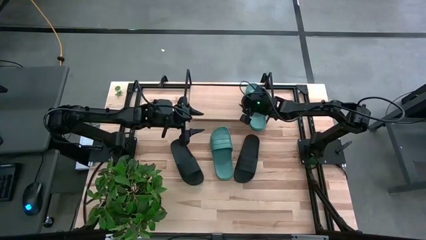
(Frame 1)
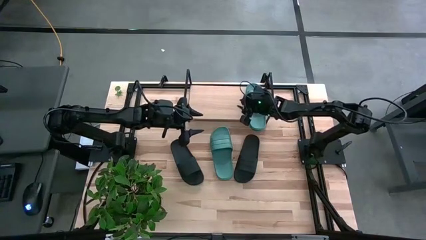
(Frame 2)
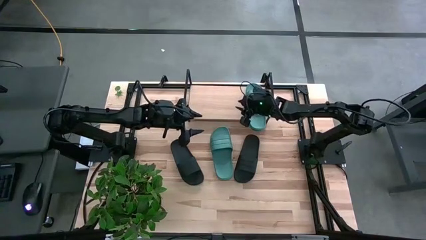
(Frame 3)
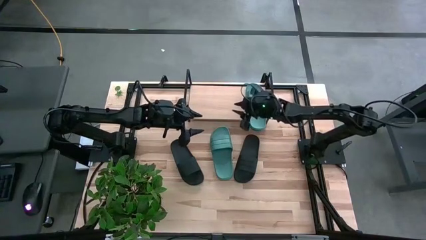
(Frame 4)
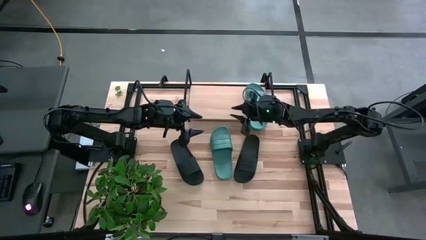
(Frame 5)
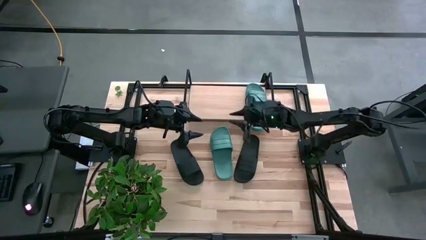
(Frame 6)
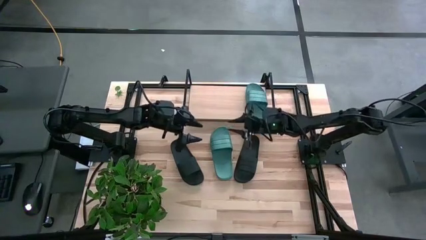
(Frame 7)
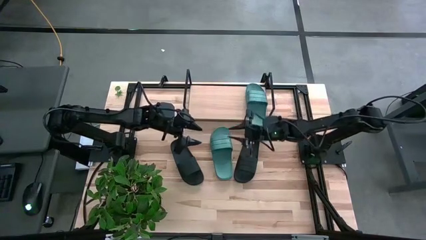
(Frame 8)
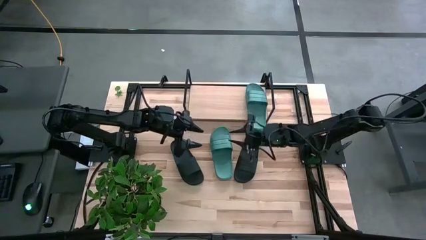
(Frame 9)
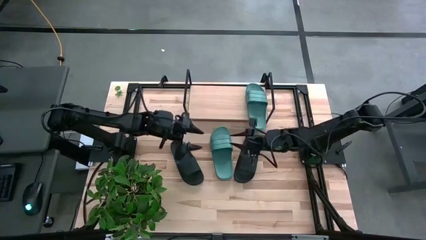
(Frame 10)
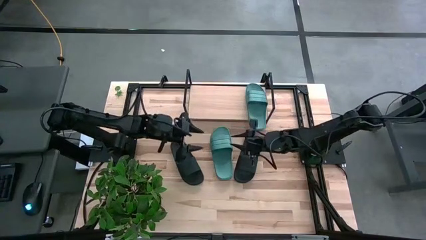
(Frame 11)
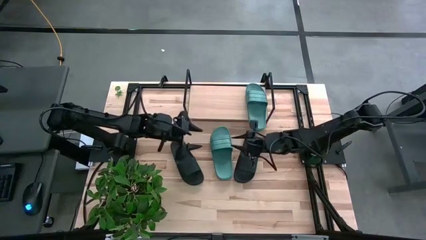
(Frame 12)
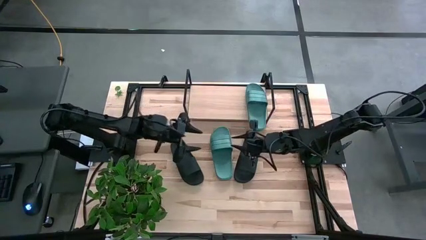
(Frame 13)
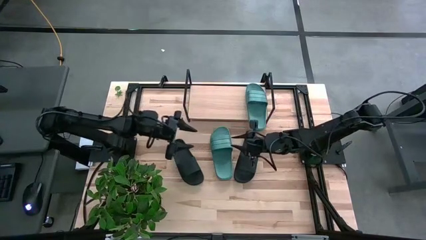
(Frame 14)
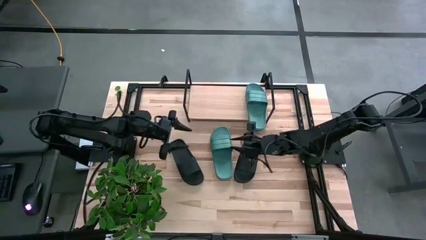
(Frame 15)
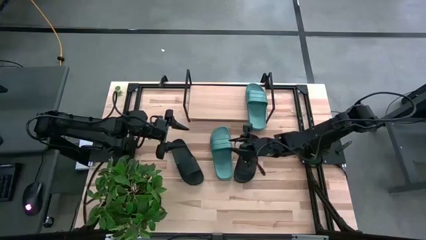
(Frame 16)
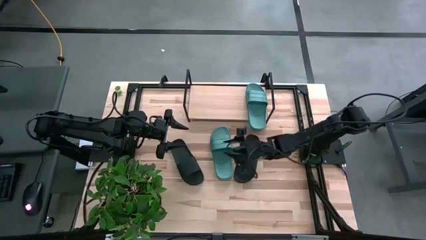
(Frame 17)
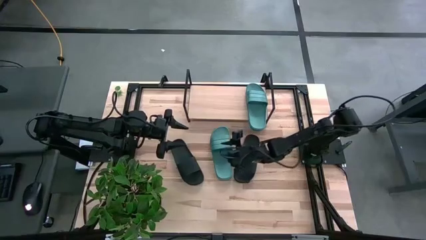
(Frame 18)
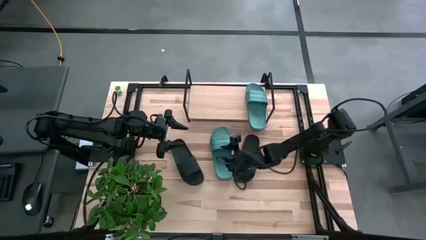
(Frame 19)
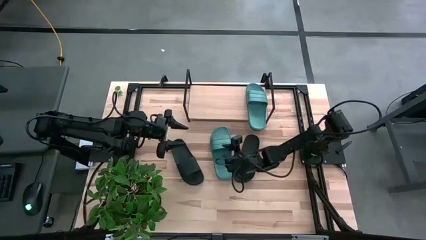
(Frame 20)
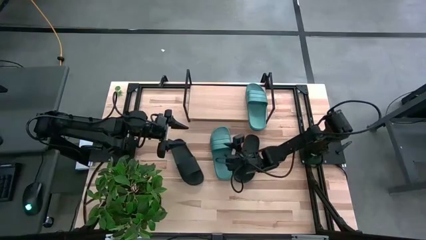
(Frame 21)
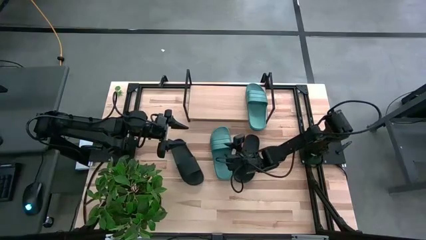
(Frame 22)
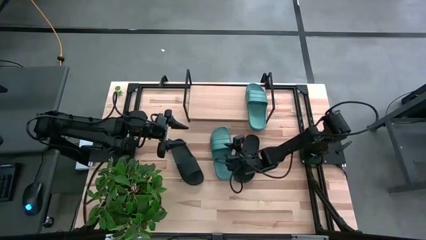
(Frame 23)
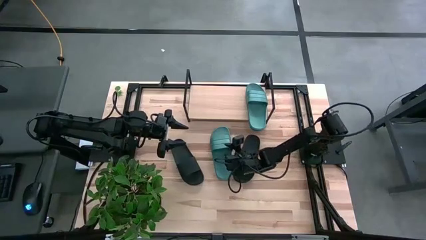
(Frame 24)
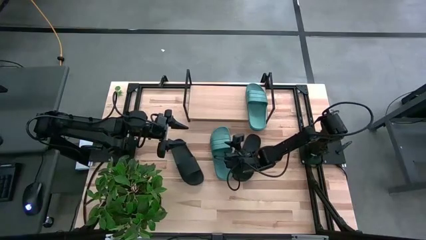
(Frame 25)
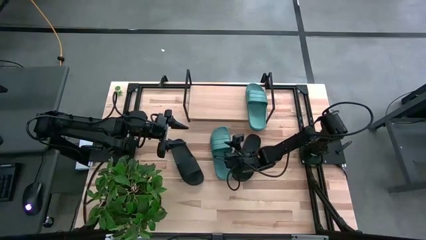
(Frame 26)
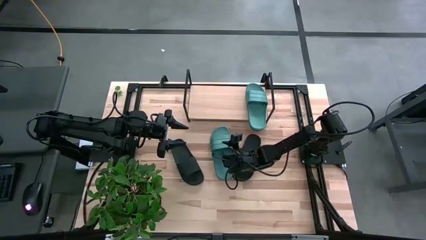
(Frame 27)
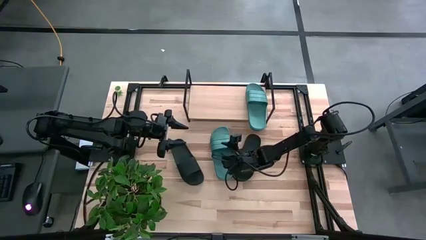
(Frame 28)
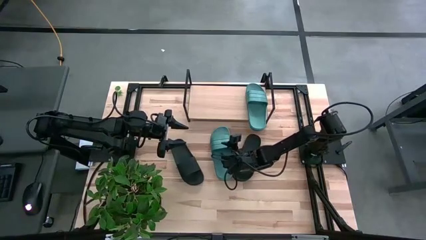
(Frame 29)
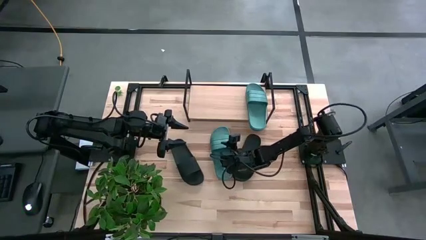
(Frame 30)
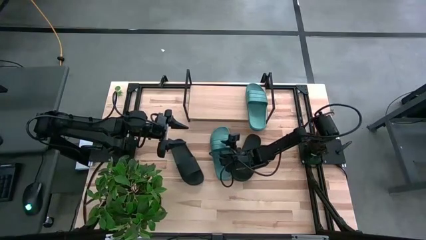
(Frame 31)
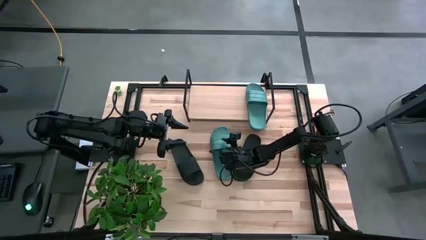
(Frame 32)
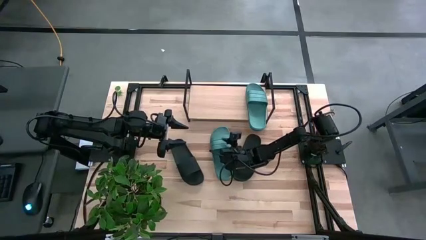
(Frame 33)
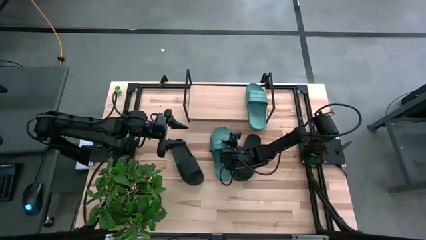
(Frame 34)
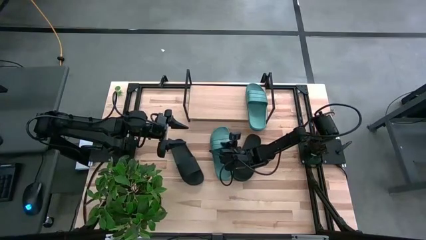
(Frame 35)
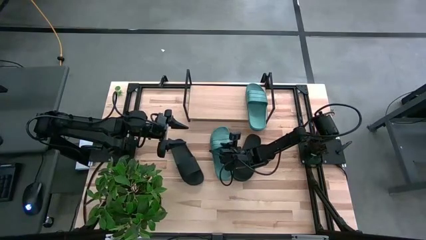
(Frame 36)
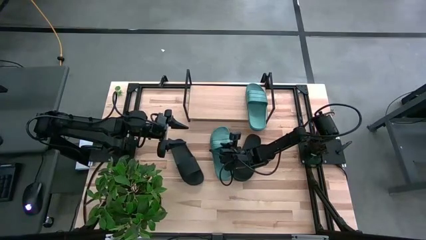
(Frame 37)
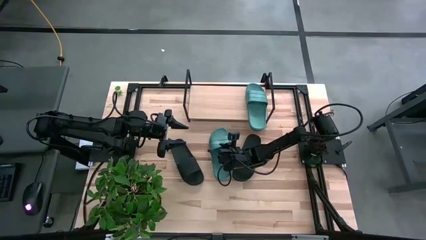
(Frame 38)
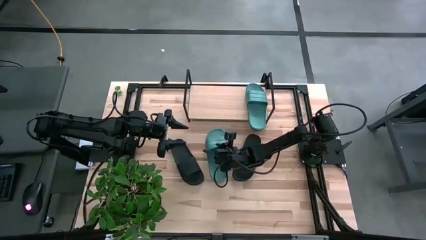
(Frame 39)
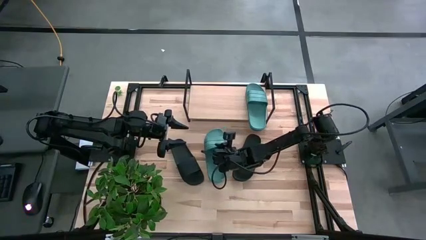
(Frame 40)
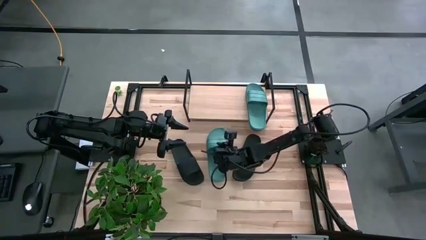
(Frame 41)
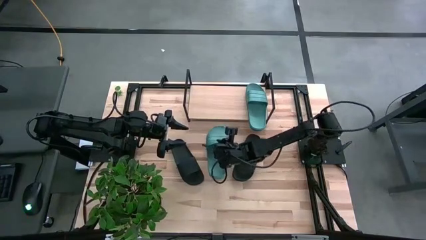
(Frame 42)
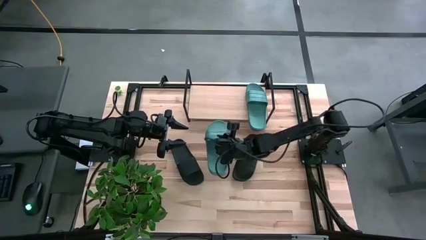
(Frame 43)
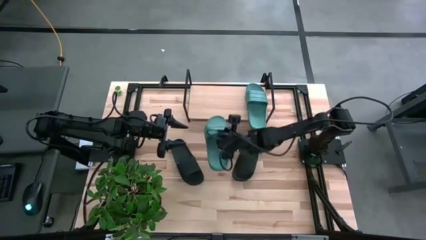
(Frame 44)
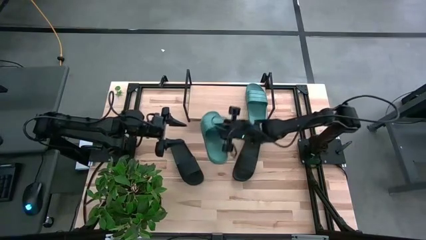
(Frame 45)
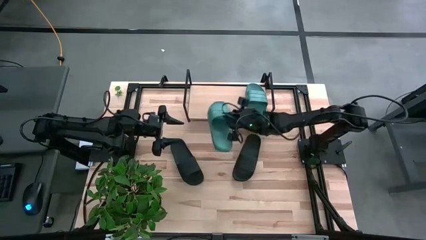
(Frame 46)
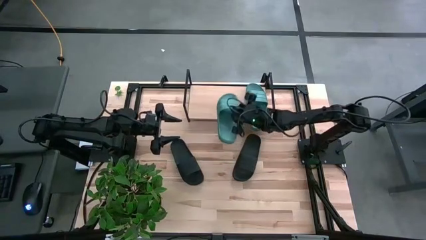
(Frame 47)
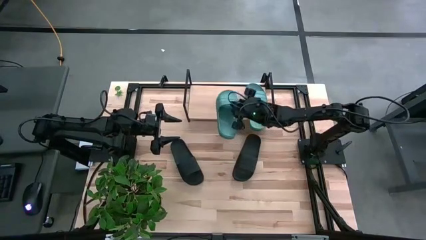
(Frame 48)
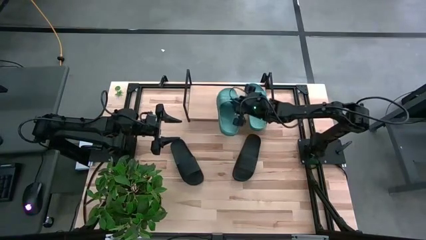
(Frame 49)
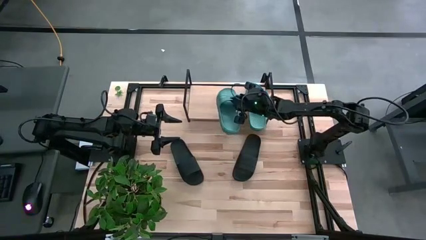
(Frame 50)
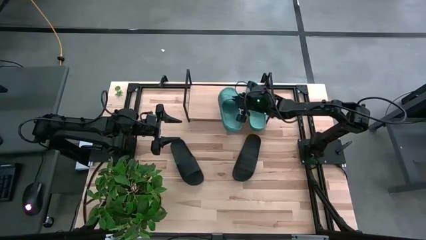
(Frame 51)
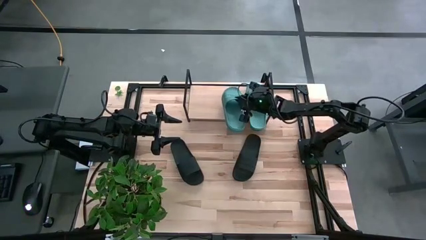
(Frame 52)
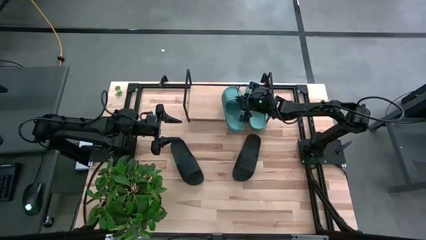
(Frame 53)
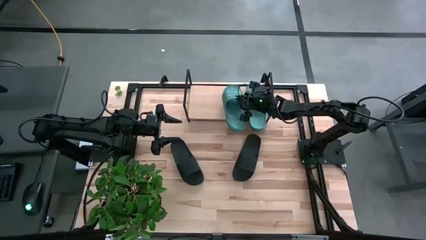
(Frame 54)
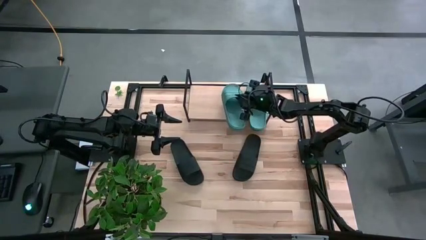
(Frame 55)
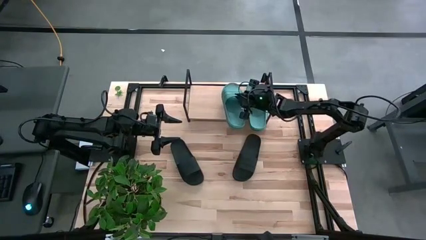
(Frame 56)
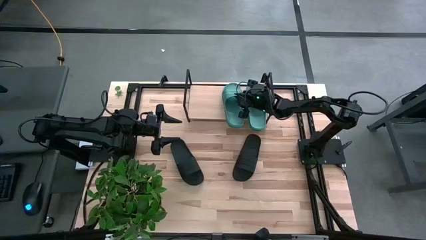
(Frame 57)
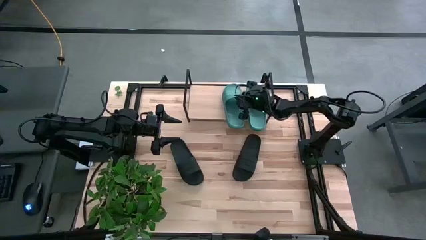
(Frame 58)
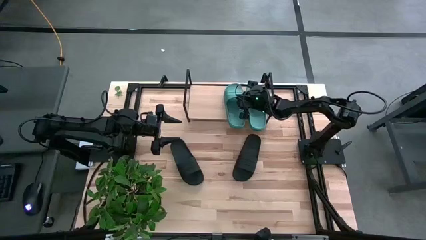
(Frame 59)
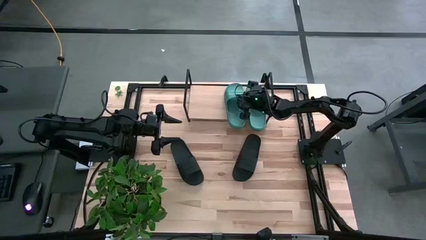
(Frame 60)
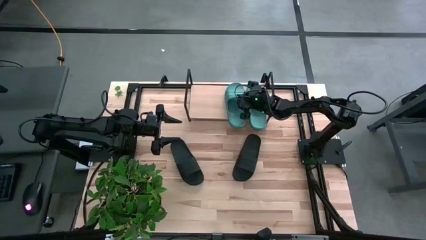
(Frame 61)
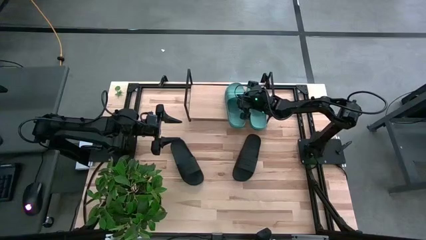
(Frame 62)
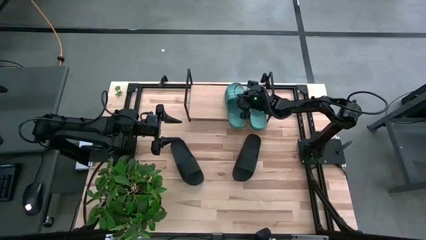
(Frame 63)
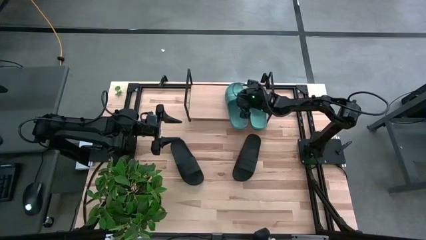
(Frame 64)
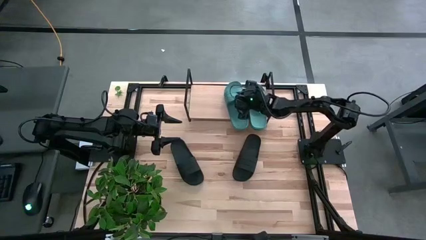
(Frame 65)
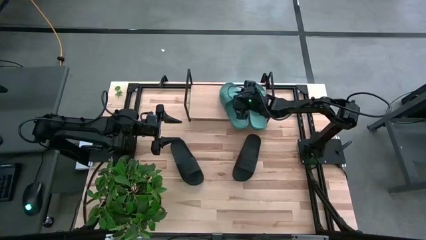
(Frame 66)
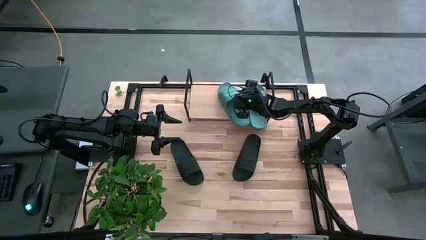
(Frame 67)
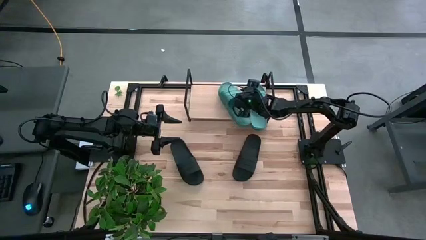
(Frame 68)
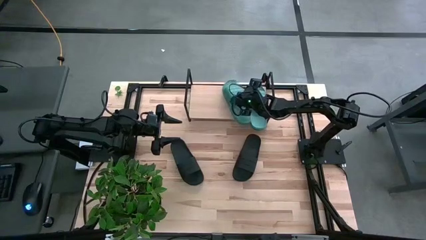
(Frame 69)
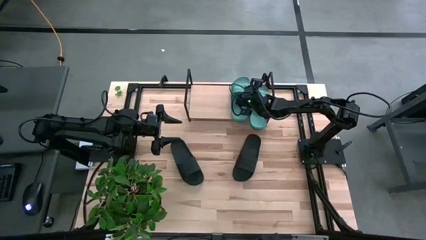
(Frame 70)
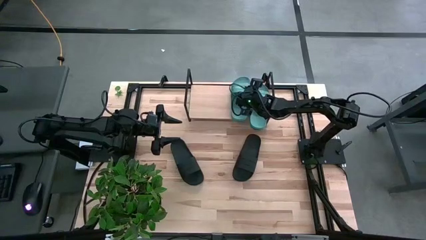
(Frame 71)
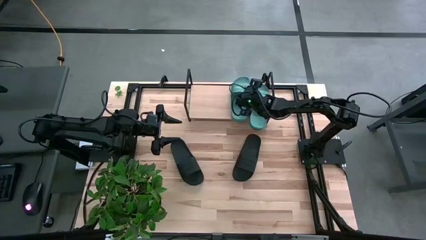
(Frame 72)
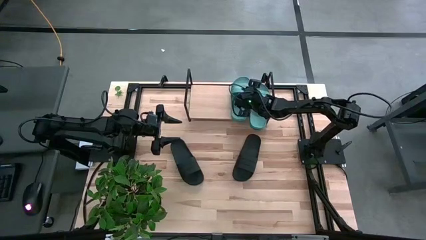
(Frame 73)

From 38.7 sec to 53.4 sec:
Task: Pick and place slides into the shelf
Put the green slides on the shelf

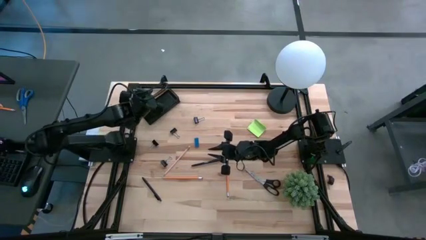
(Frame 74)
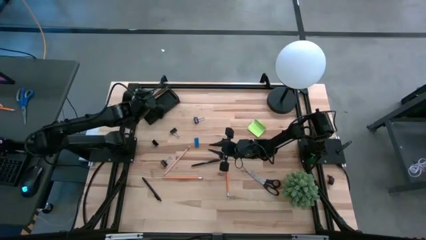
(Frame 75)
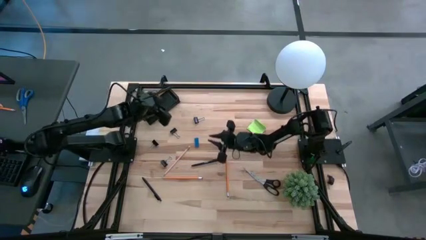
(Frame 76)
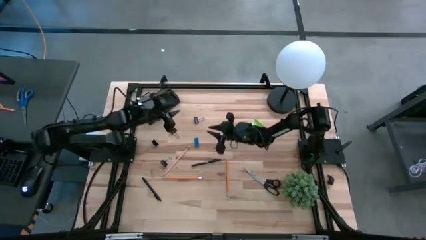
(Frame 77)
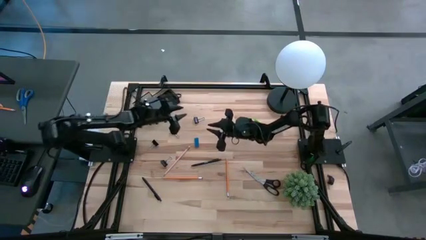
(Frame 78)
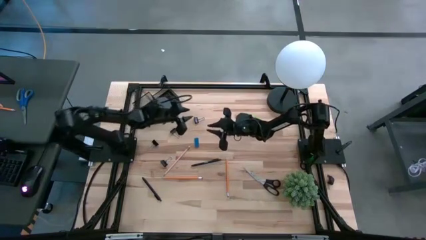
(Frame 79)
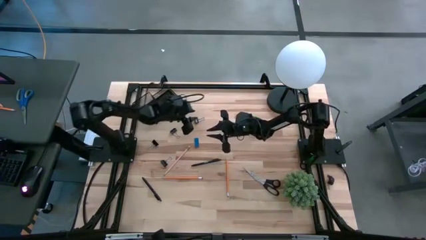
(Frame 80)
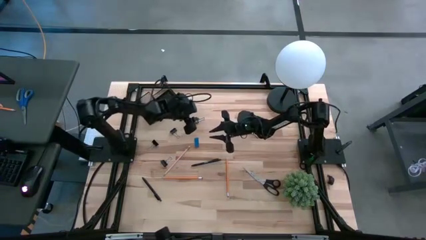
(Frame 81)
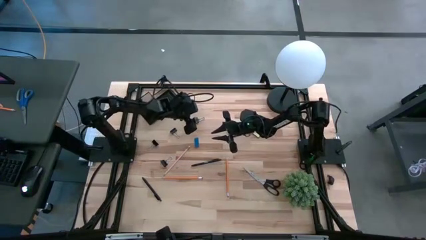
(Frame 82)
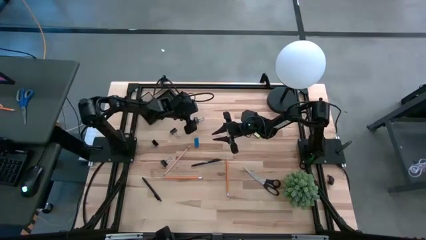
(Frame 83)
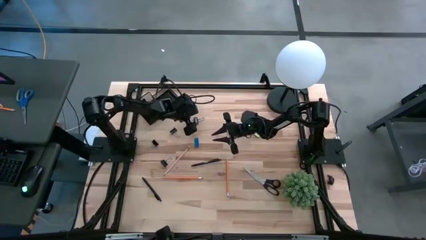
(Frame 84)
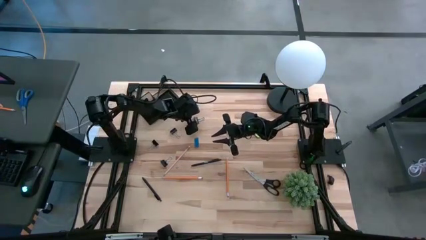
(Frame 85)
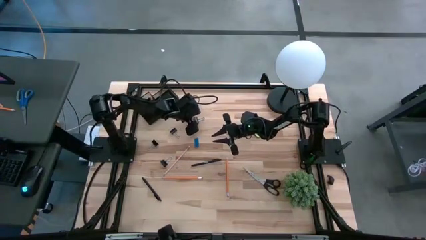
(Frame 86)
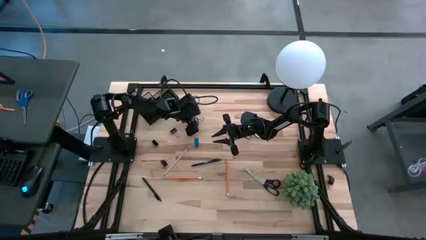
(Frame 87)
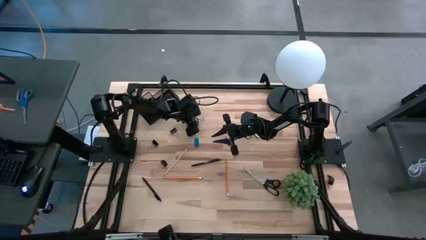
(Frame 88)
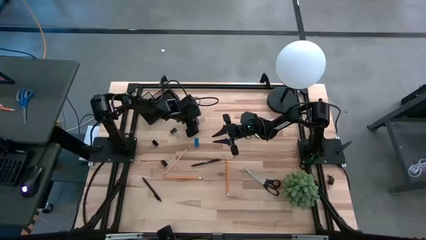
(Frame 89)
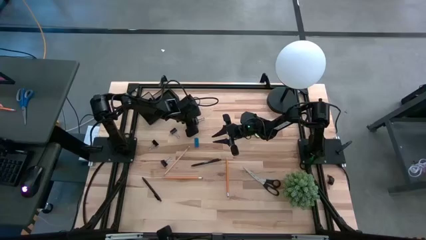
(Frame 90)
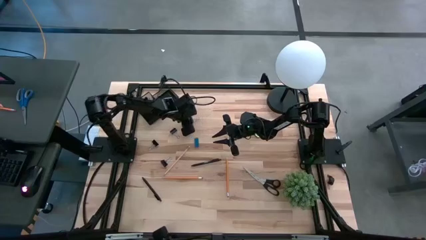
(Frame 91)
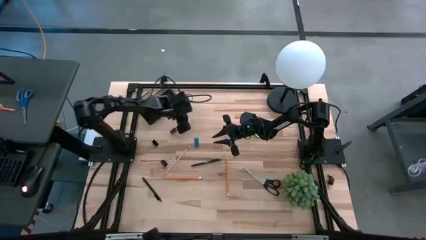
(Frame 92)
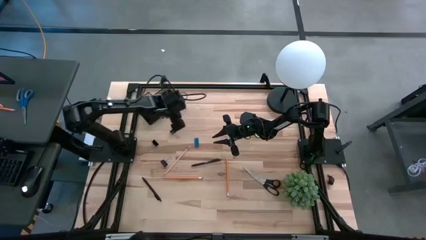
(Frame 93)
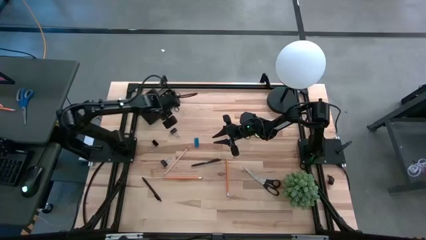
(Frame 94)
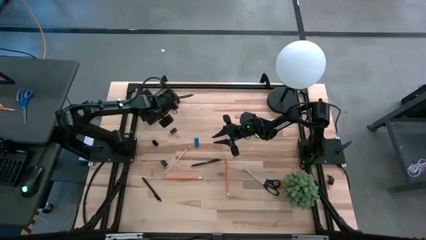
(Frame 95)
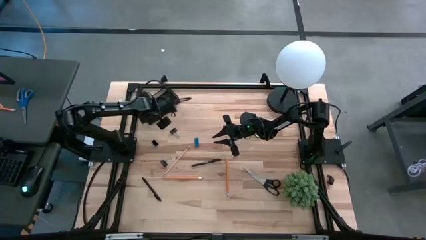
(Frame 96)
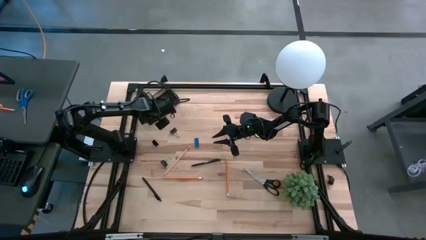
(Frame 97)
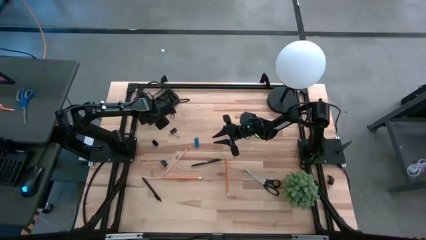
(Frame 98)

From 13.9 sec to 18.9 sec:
Task: Pick and place office supplies into organizer
Put the black binder clip into the bottom left section of the desk organizer
